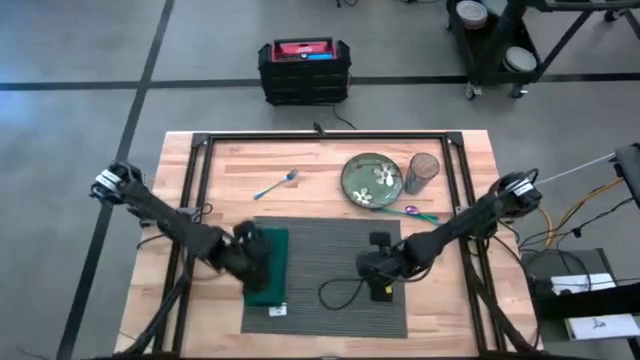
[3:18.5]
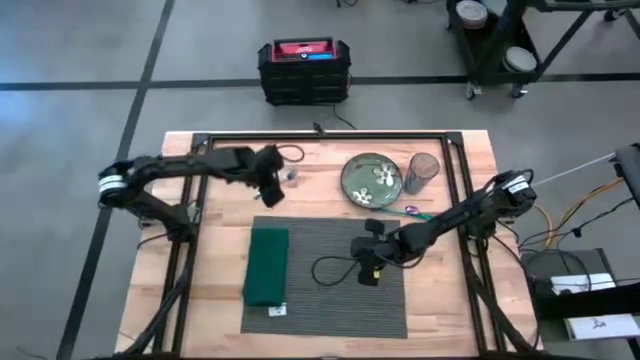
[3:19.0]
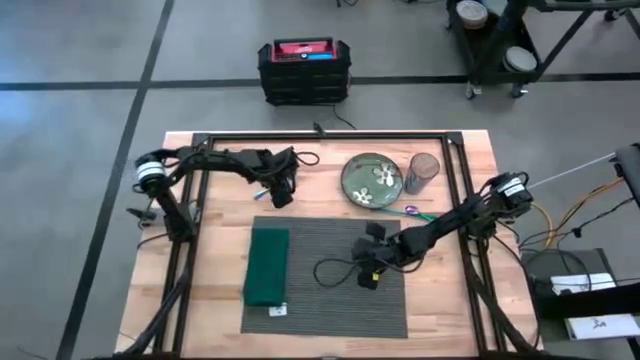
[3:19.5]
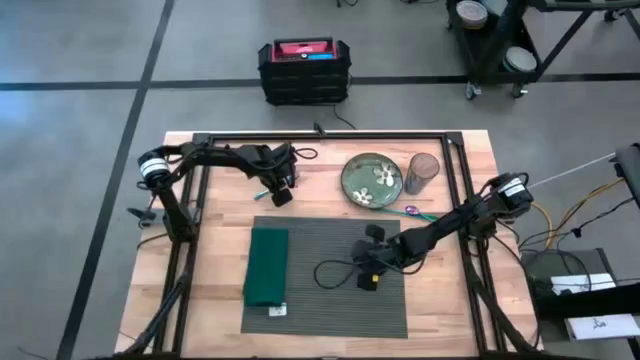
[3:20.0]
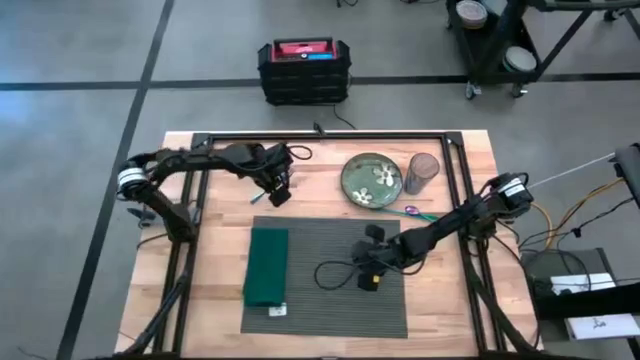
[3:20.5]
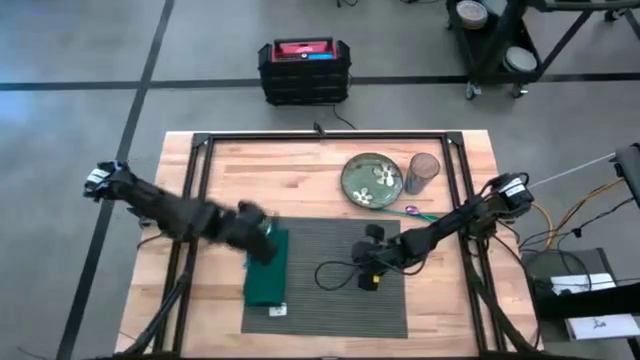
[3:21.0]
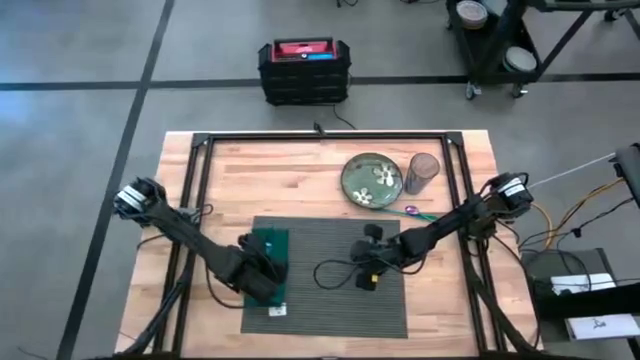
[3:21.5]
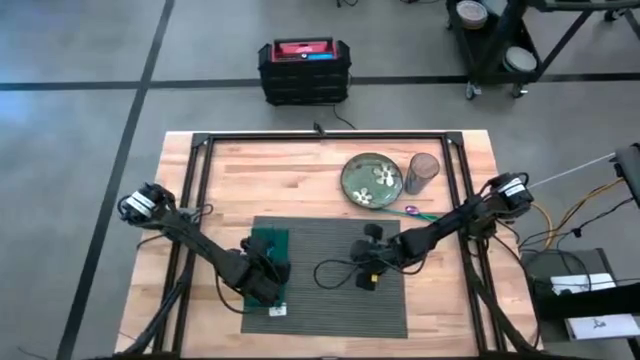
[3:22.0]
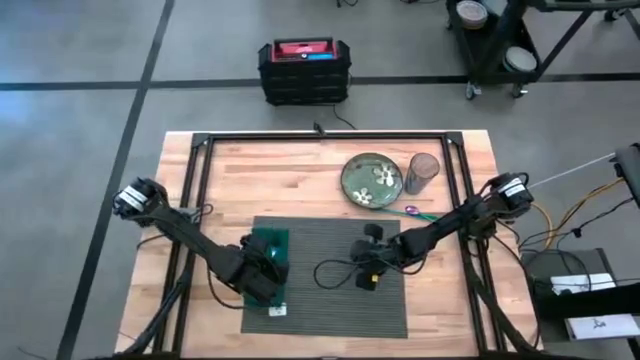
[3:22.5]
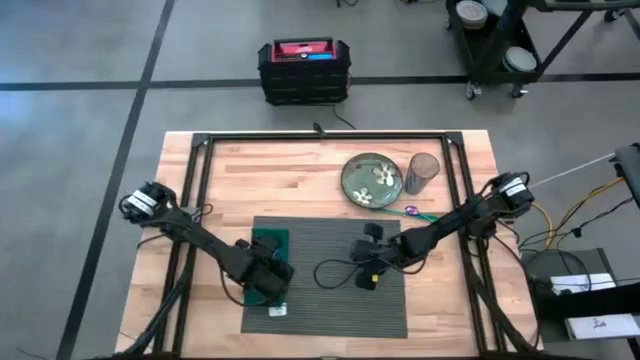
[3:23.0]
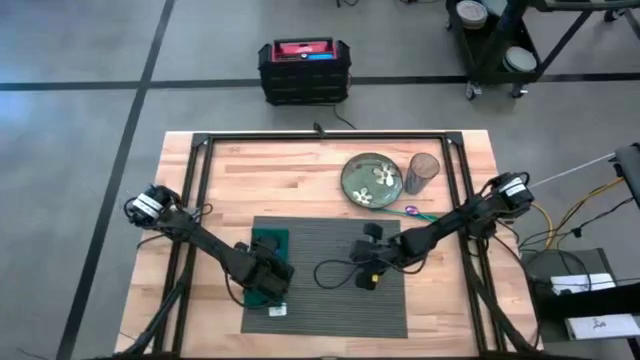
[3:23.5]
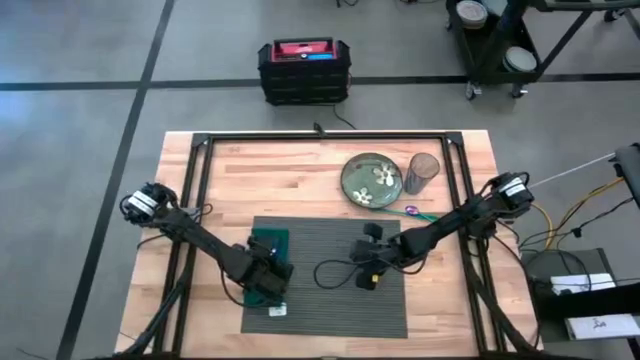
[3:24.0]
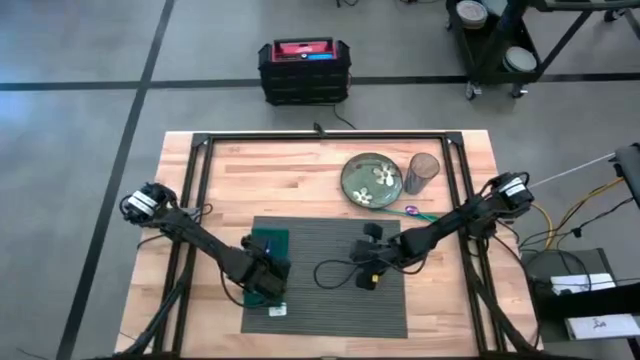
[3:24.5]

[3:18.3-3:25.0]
Task: Set table place
Put the iridescent blue fork on top of the green napkin

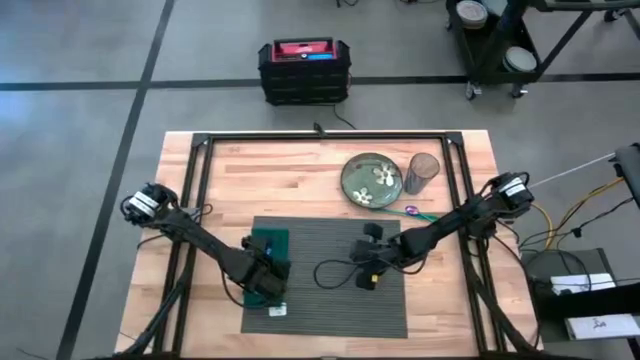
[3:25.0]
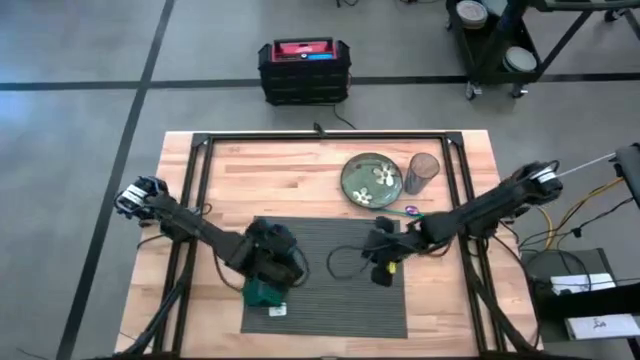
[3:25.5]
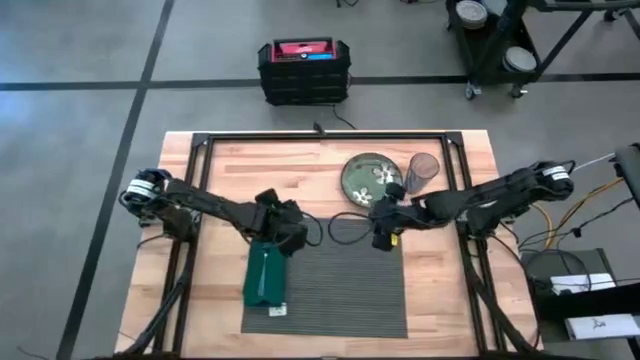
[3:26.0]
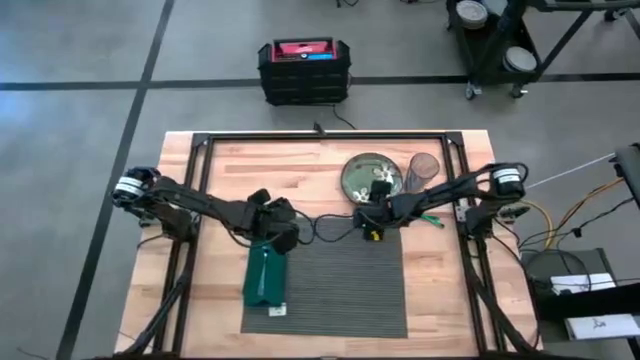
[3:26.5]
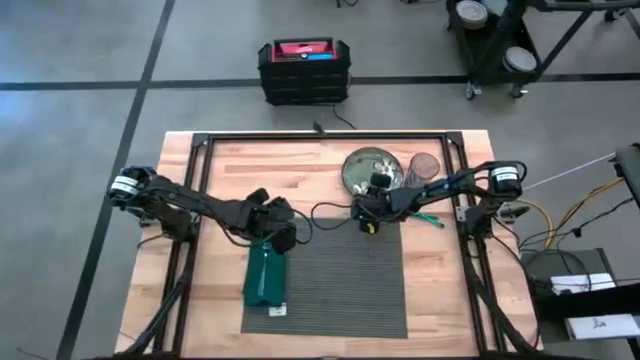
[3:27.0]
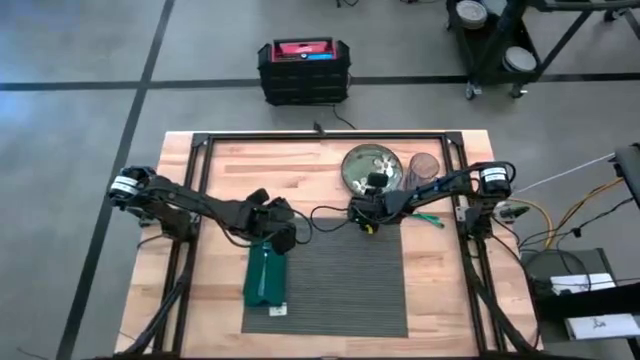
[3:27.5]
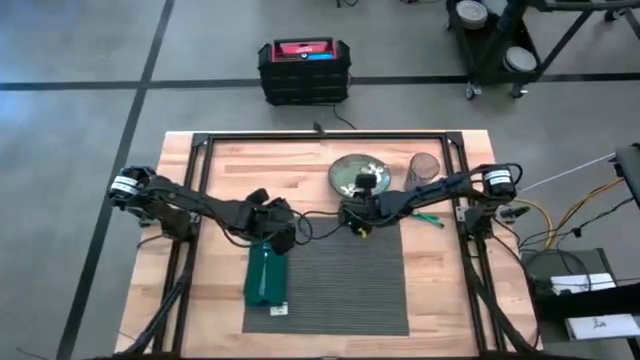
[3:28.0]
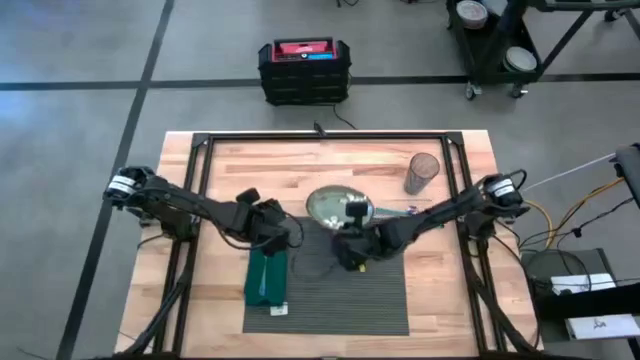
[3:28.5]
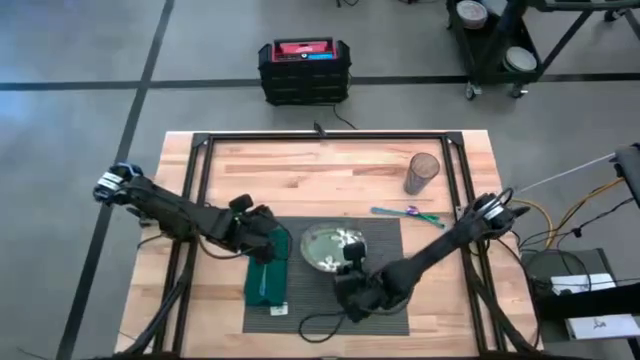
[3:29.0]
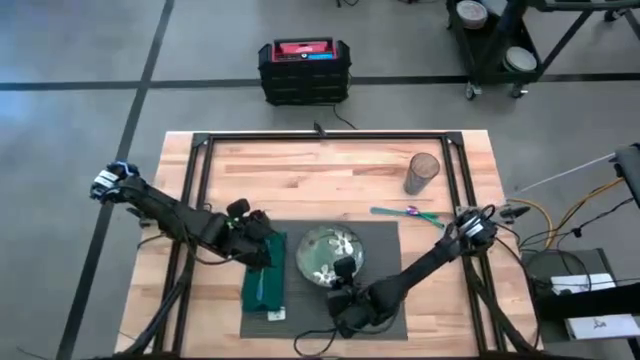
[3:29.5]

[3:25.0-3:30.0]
Put the green plate on top of the gray place mat

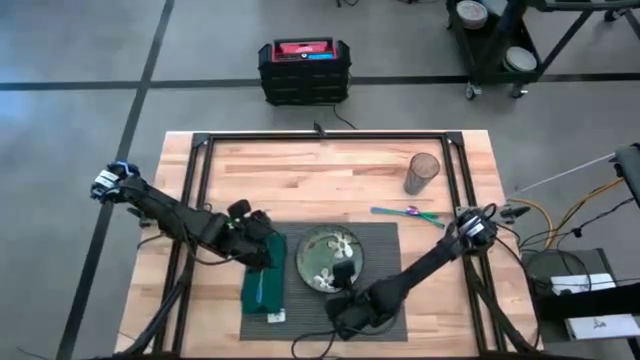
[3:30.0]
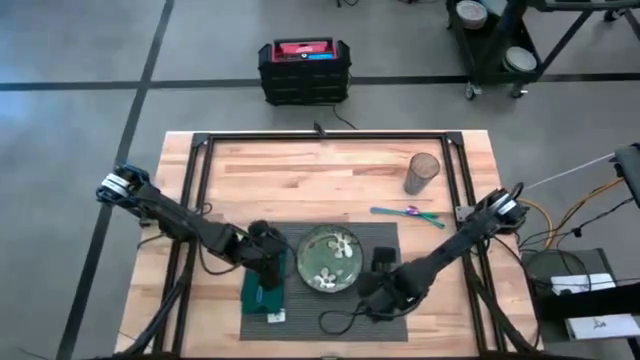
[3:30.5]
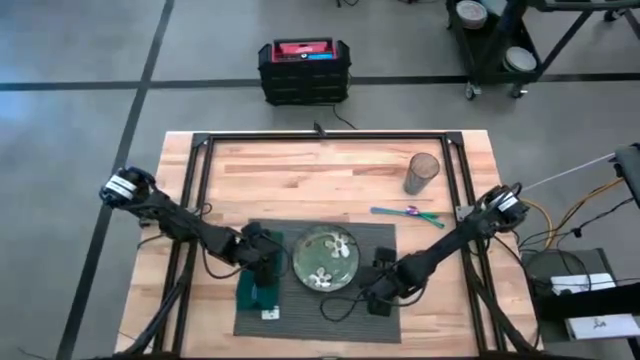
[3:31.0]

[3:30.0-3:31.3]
Adjust the gray place mat

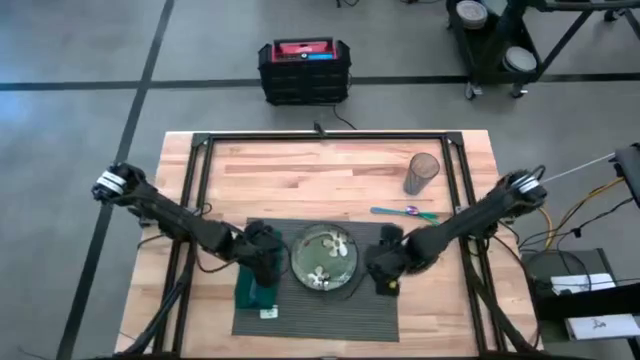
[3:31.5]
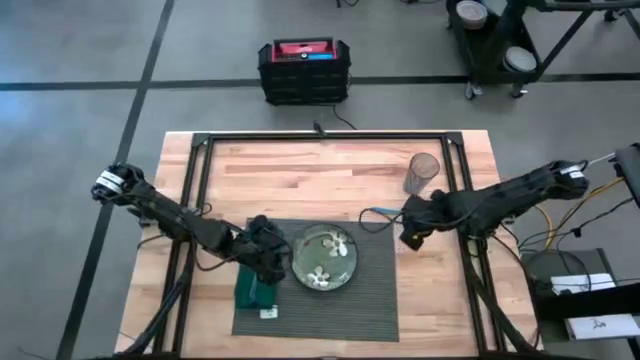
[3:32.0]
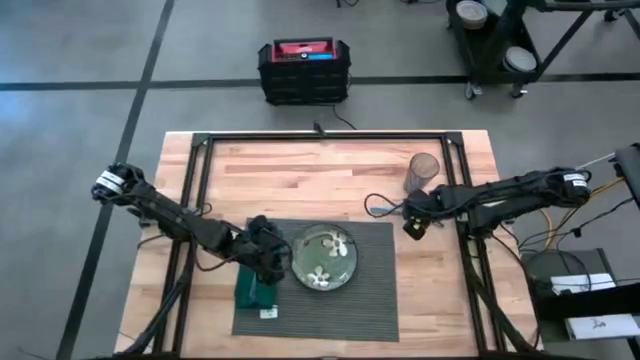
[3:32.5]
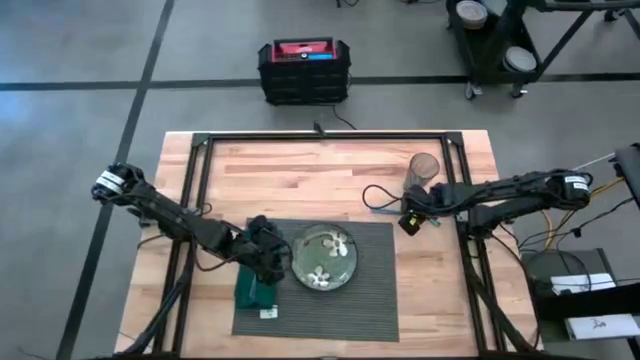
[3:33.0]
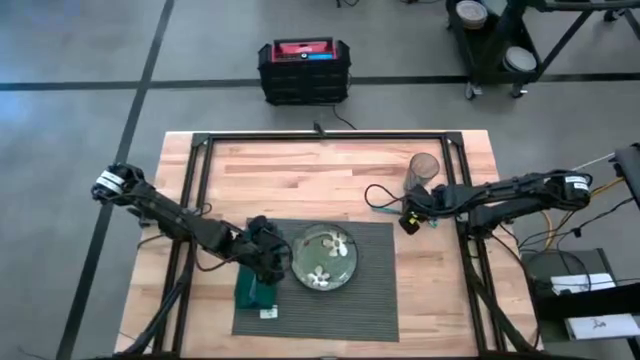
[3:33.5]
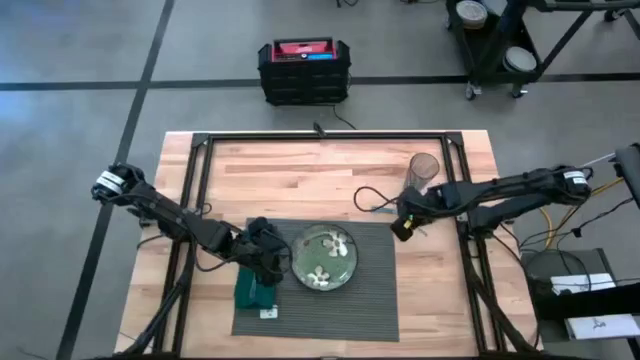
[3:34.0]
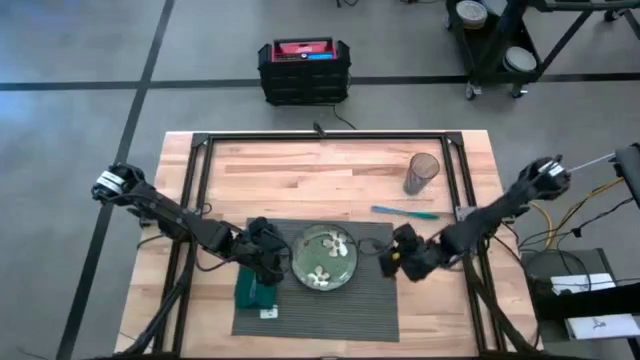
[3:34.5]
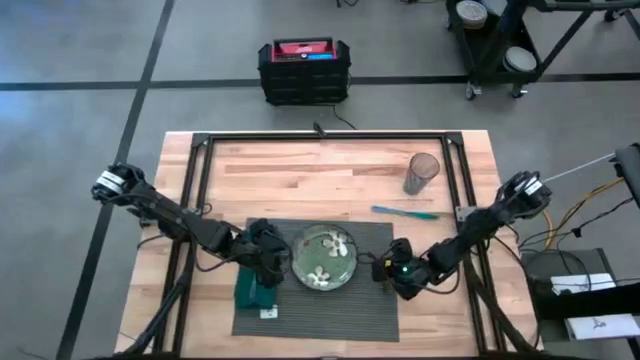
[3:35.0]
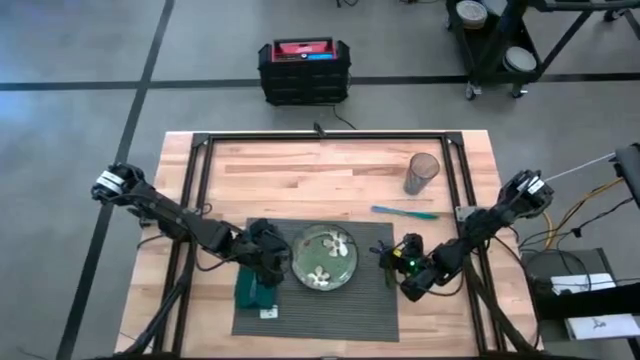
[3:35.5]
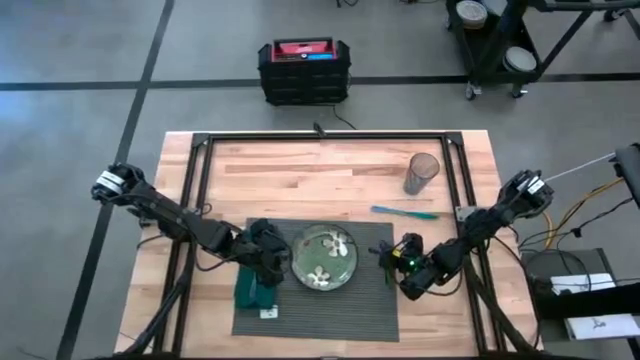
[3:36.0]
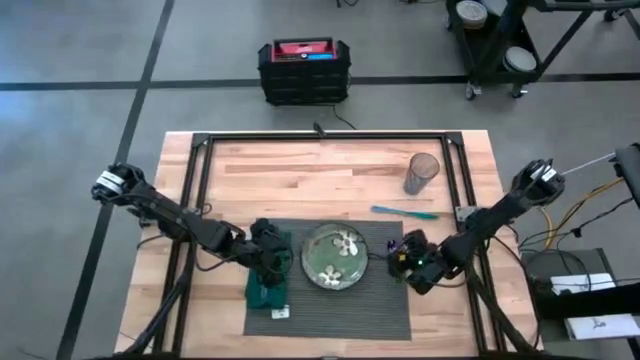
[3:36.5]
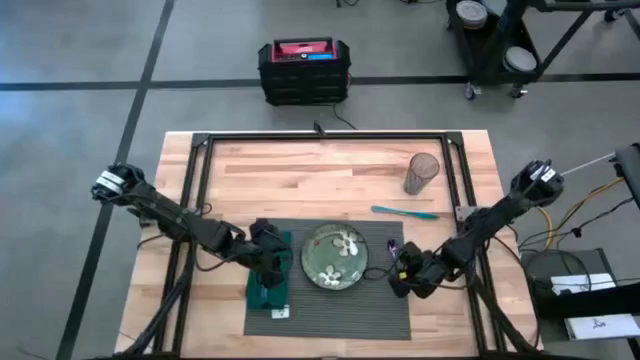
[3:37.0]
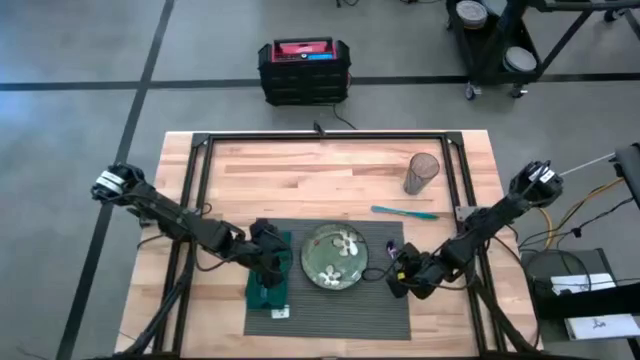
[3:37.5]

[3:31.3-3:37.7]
Put the iridescent blue spoon on the gray place mat

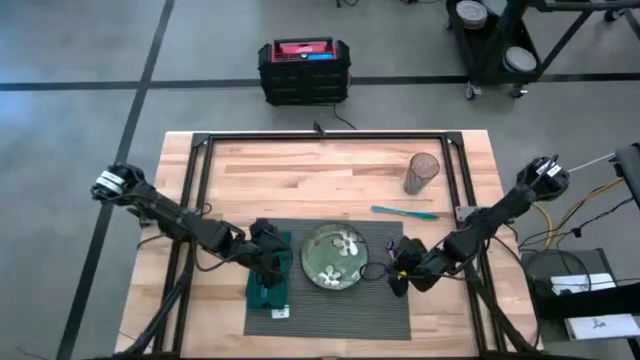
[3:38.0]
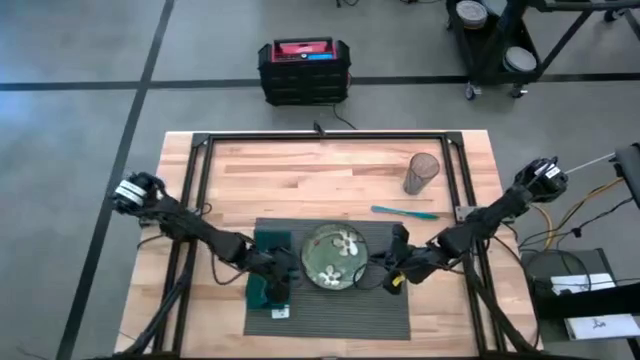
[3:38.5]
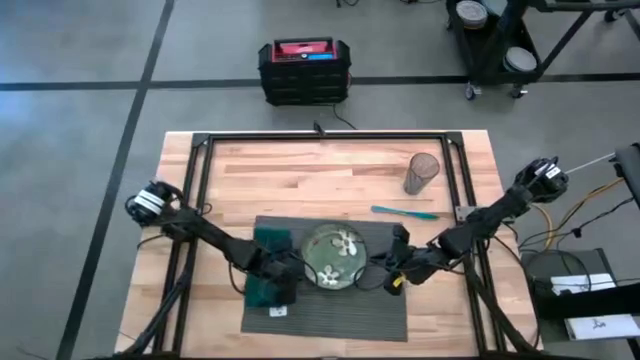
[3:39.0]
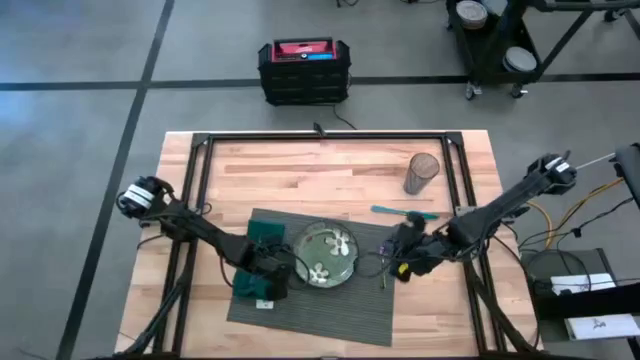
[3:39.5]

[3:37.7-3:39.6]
Adjust the gray place mat
